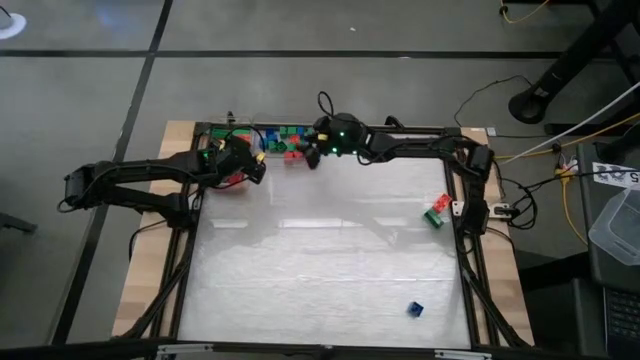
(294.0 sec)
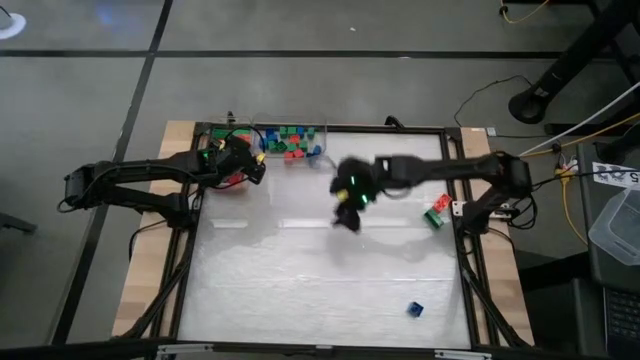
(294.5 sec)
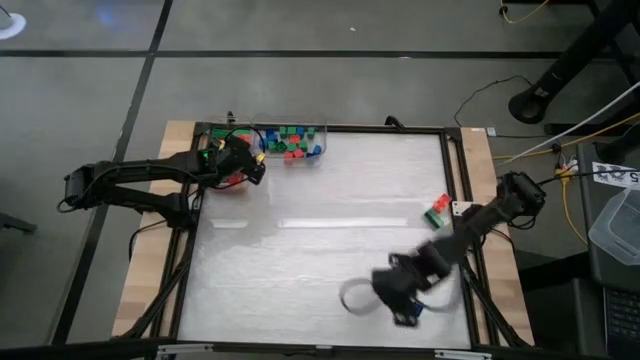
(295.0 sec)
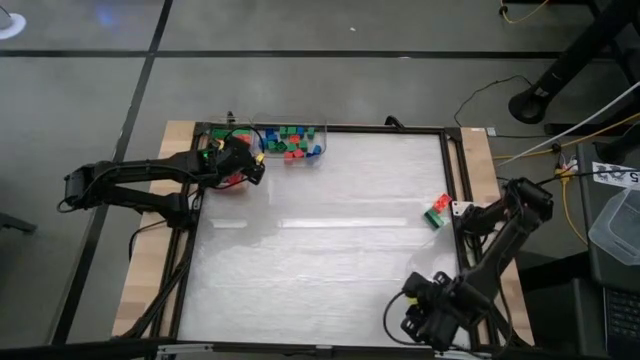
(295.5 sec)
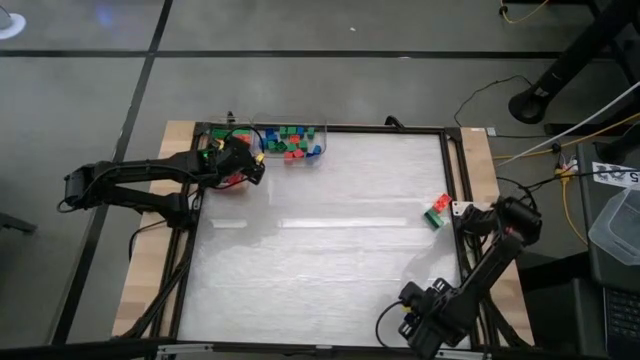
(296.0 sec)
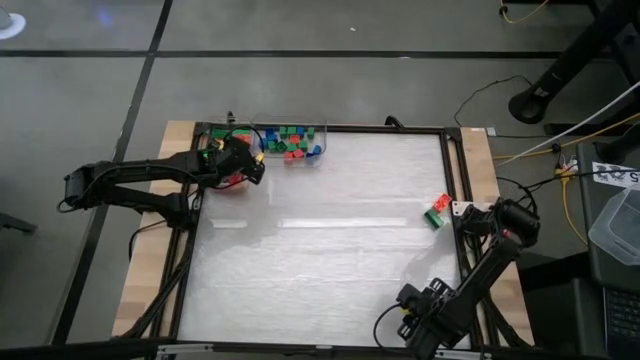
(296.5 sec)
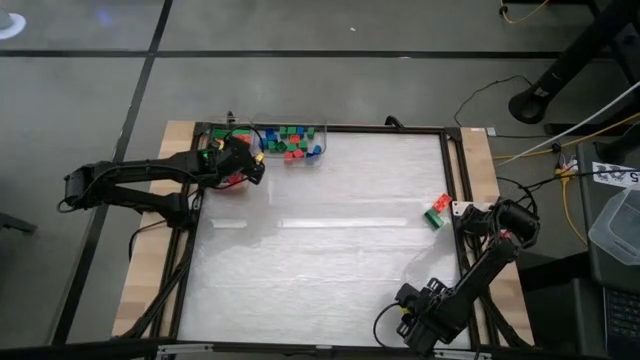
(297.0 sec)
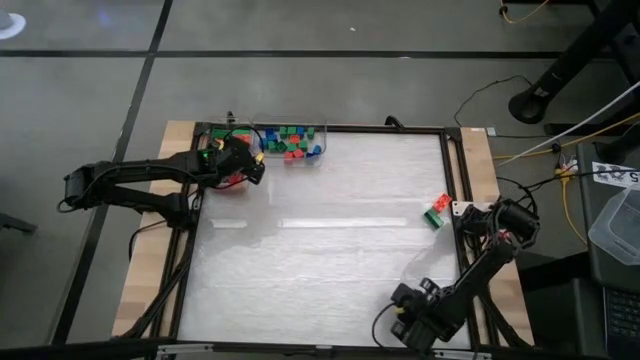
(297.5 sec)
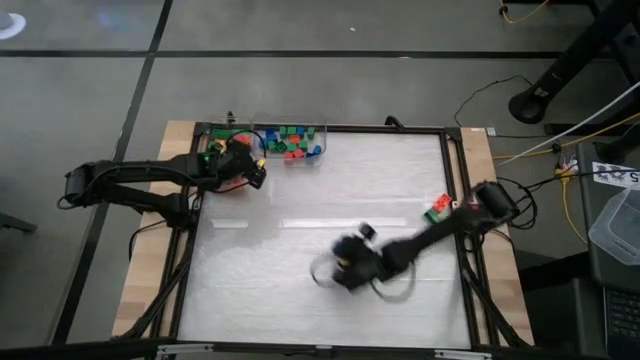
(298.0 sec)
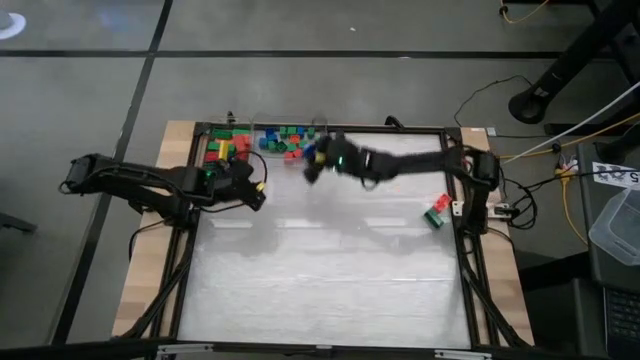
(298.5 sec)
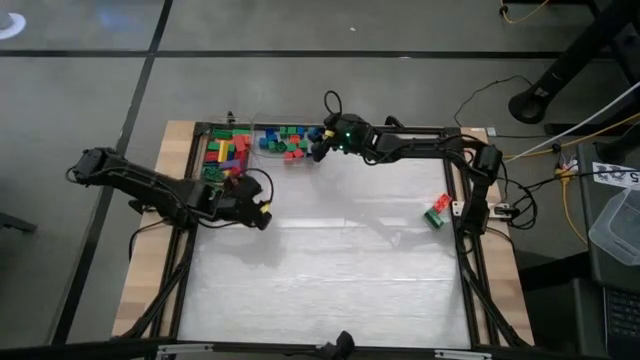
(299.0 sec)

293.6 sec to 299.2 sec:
Task: Sort blocks by size
Put the small blue game piece into the right transparent bin

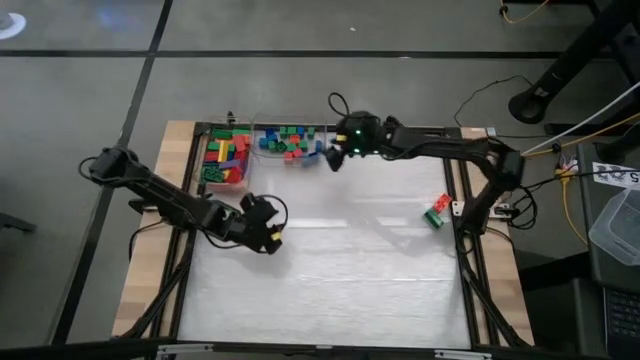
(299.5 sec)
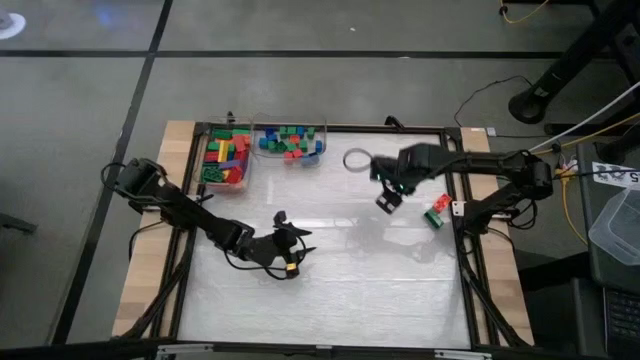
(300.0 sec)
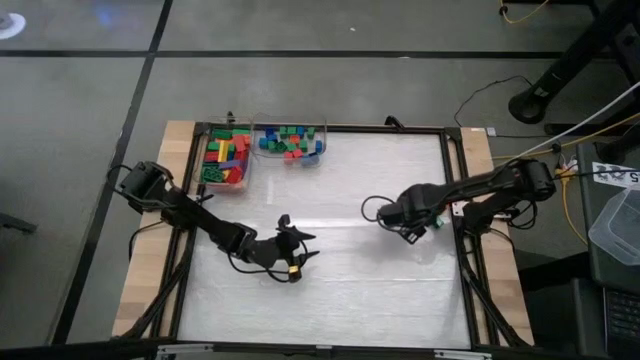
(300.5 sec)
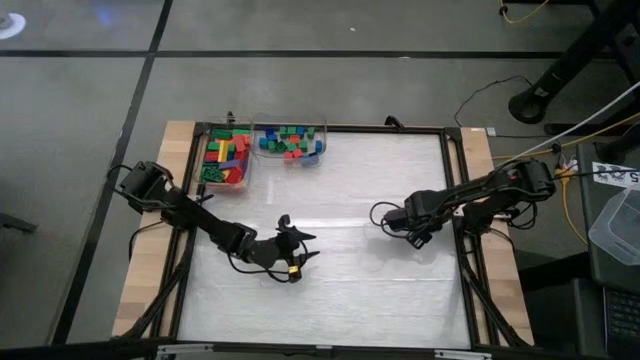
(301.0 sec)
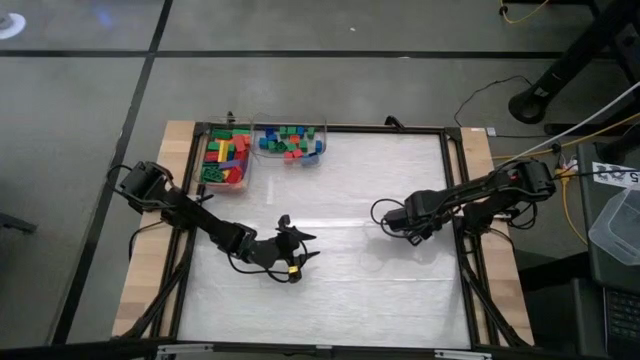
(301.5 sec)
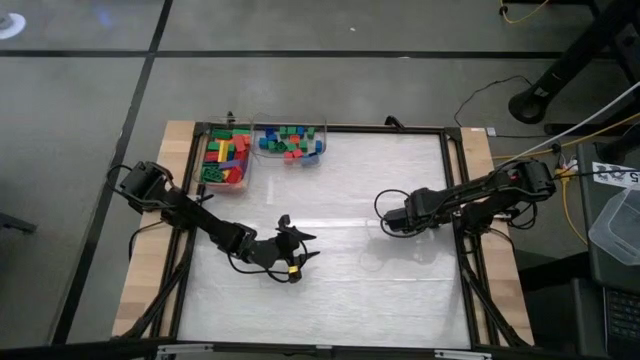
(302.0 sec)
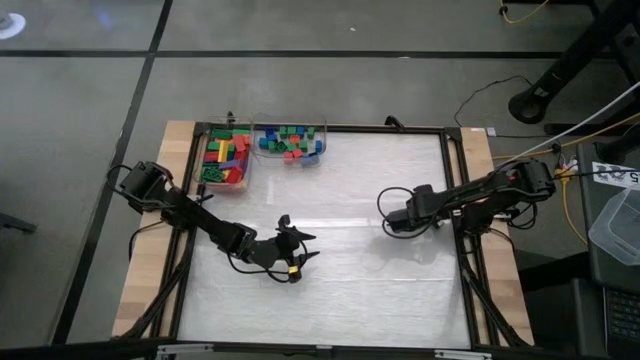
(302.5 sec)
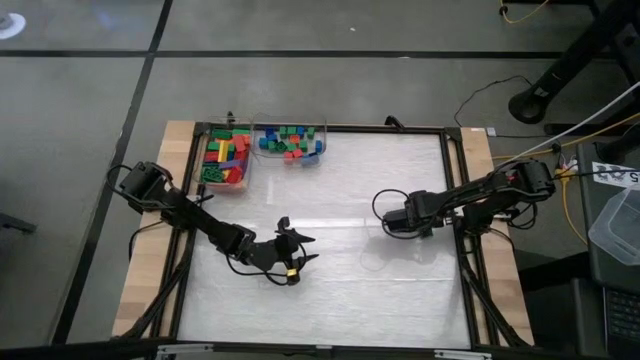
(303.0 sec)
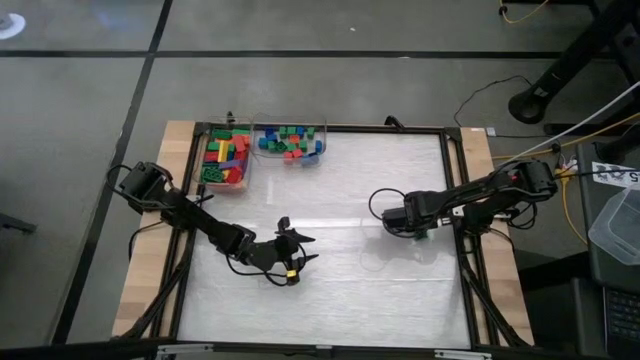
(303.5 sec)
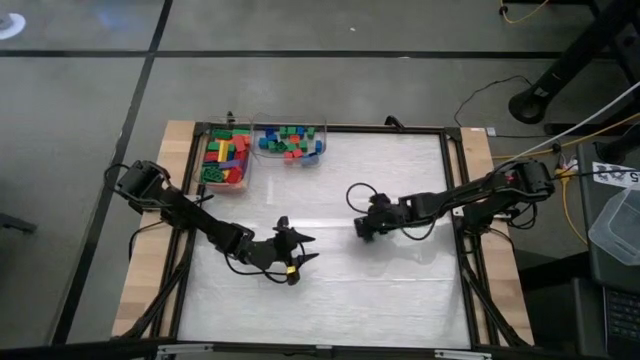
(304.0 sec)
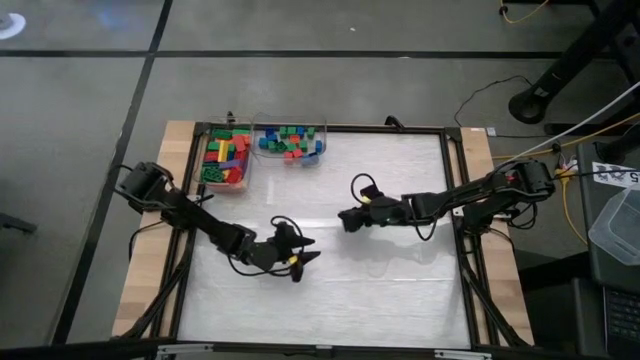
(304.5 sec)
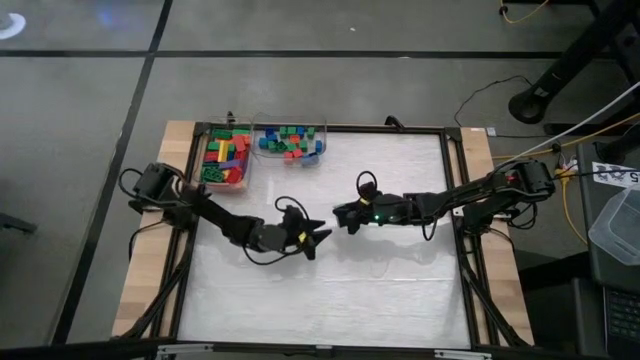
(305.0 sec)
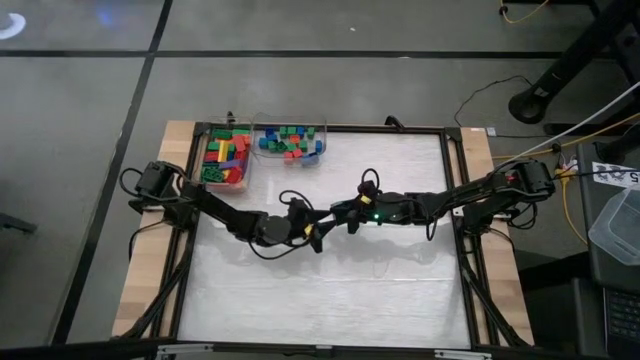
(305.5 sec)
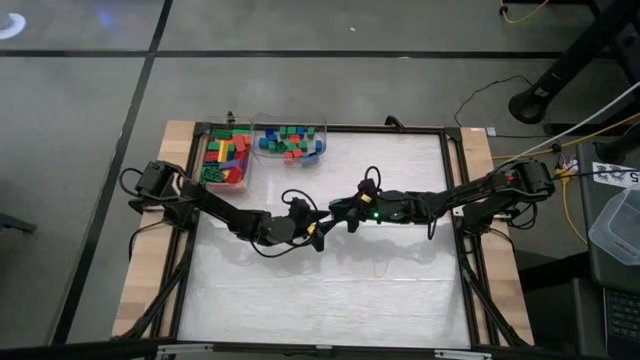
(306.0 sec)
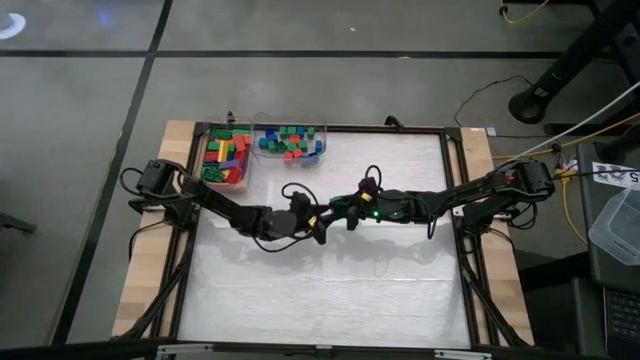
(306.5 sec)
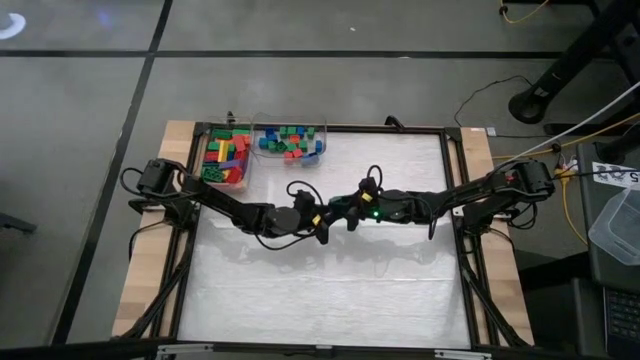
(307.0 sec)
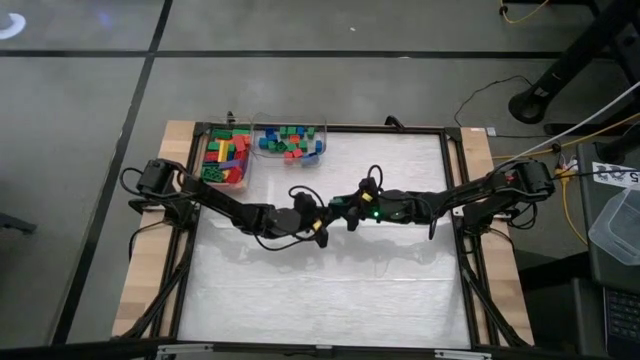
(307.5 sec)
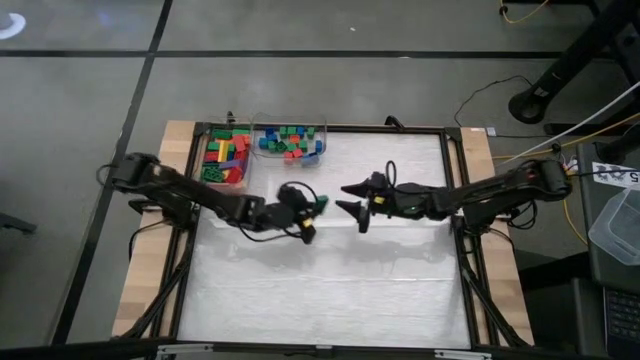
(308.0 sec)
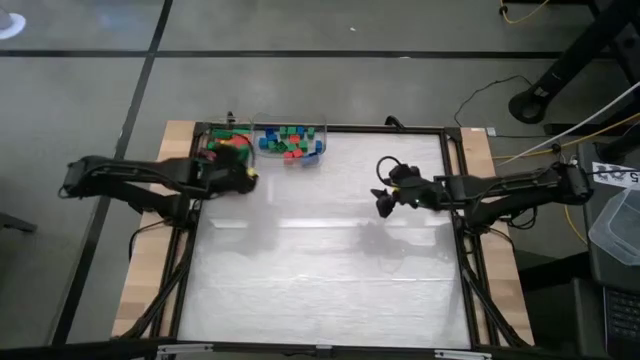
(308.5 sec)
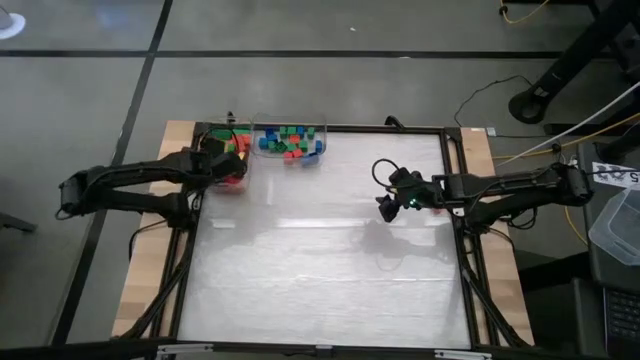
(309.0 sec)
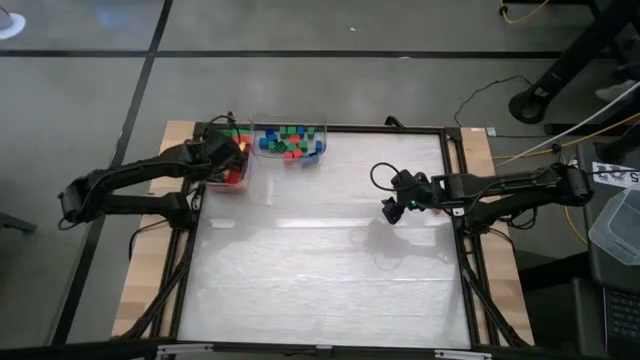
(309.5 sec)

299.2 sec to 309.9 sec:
Put the large green game piece into the left transparent bin

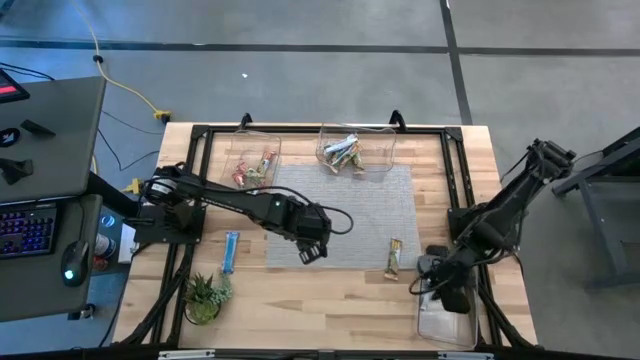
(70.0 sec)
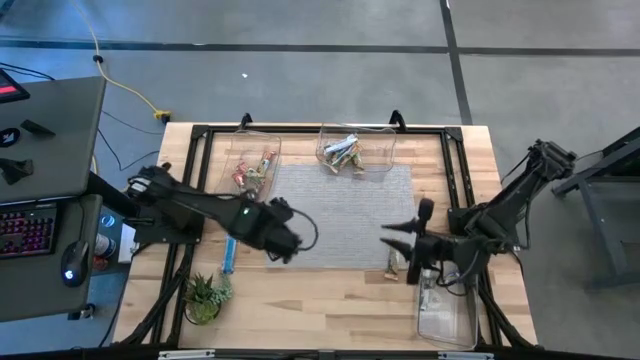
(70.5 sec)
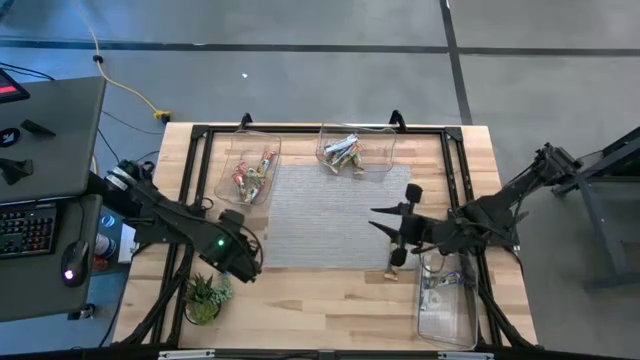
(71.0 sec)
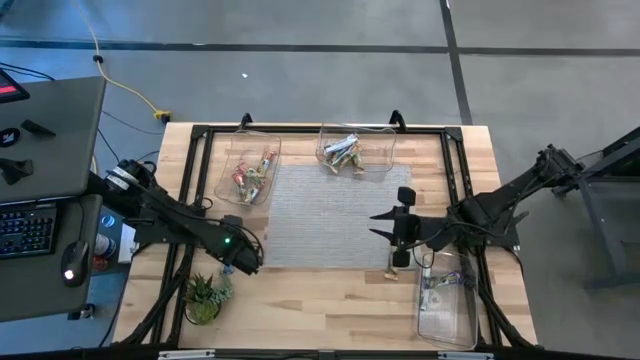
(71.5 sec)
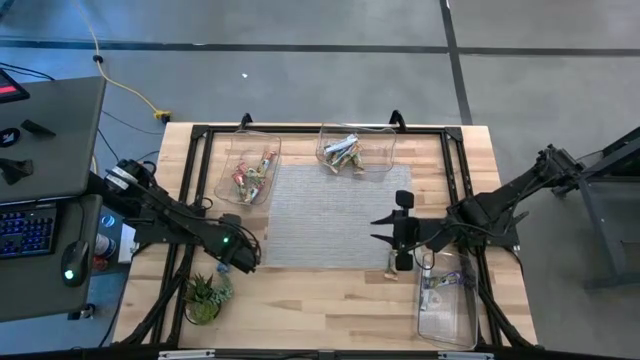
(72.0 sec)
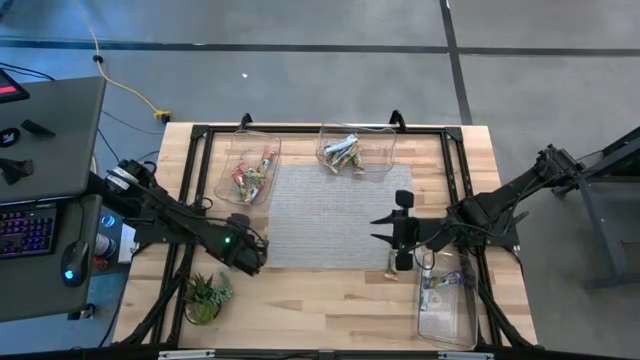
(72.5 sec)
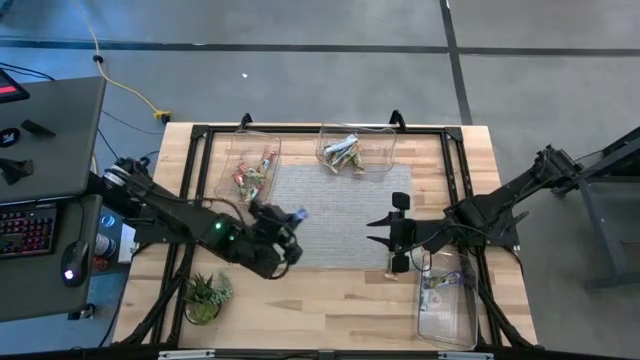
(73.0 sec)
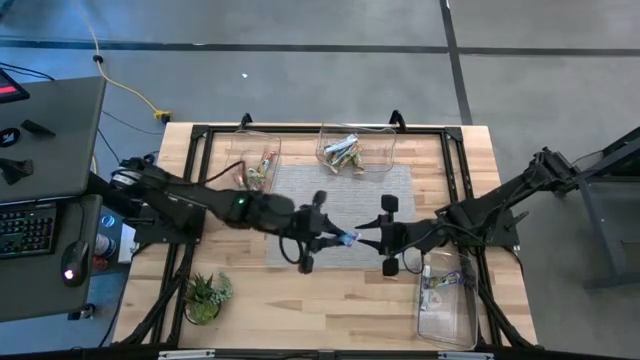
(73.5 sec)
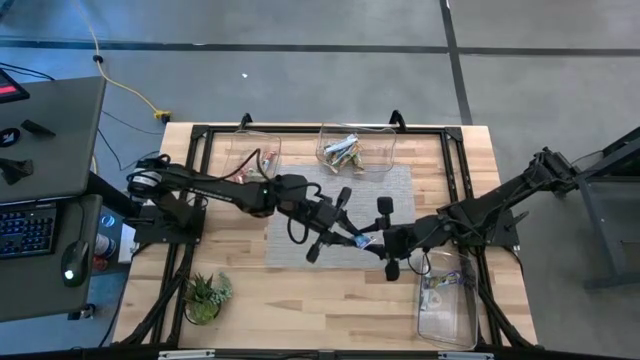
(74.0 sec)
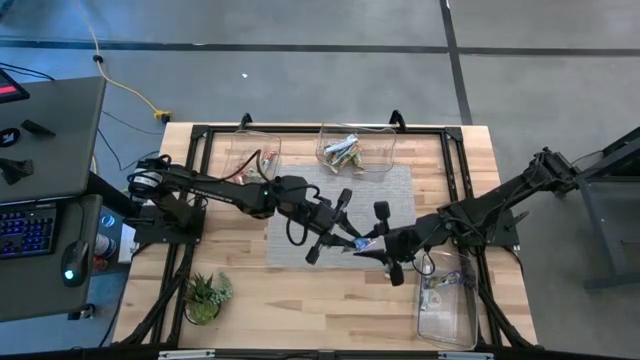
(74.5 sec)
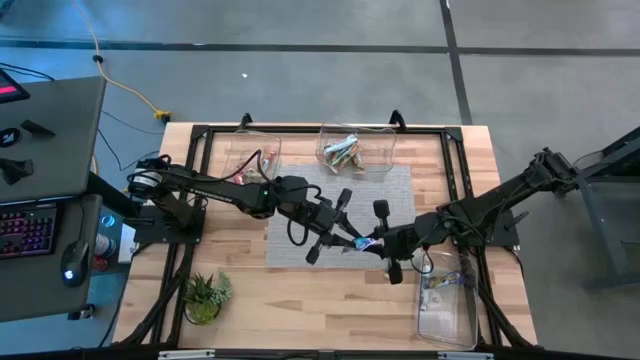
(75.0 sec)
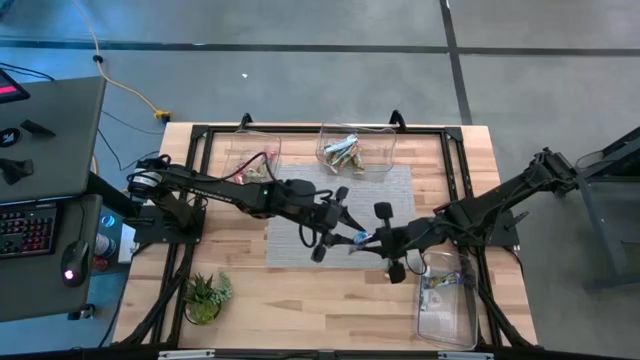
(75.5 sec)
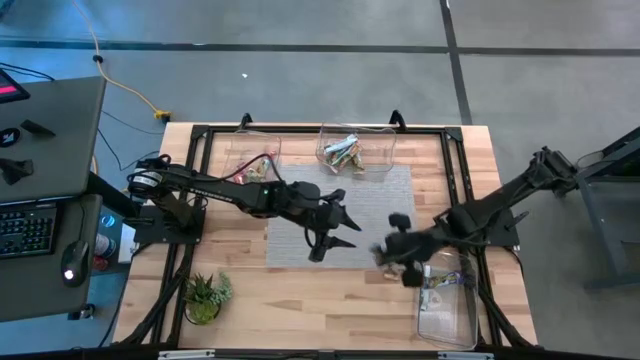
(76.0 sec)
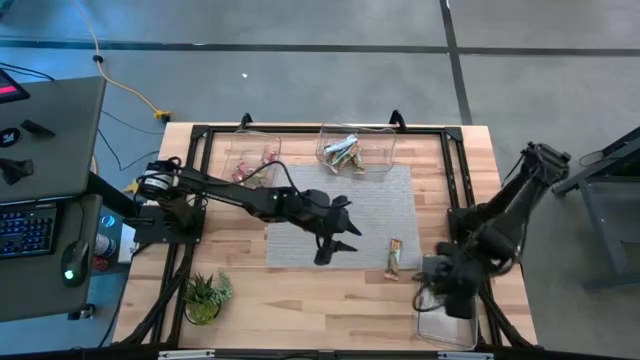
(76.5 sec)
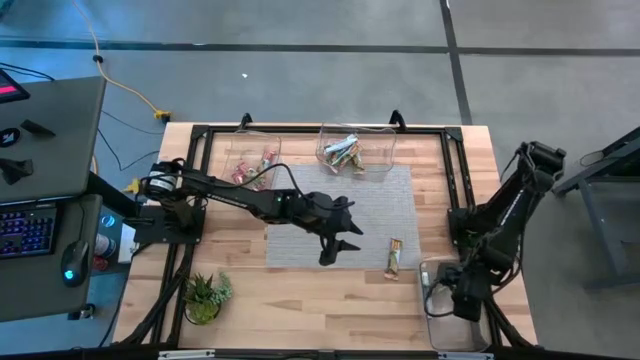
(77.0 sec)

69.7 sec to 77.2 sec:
Task: Pick and place Granola Bars by type
Put the blue granola bar into the bottom transparent bin
